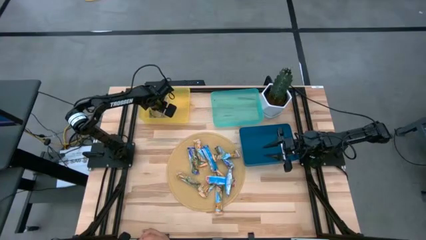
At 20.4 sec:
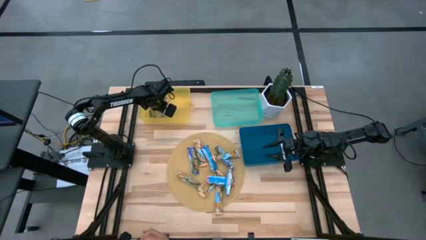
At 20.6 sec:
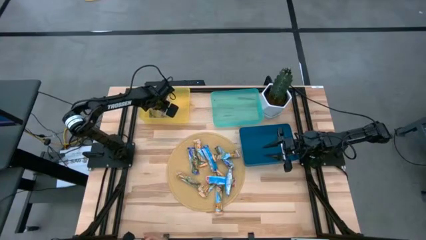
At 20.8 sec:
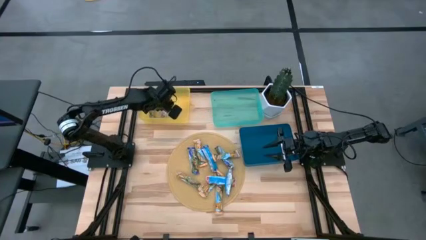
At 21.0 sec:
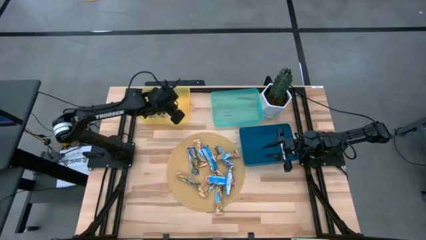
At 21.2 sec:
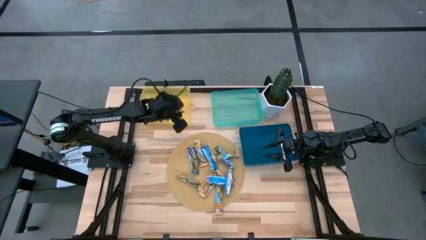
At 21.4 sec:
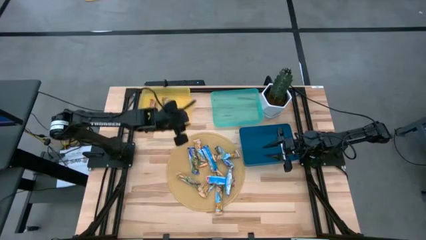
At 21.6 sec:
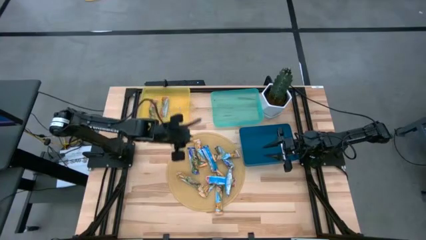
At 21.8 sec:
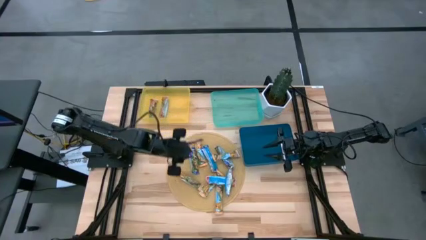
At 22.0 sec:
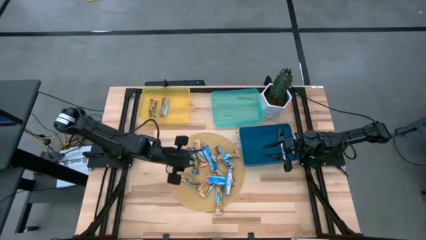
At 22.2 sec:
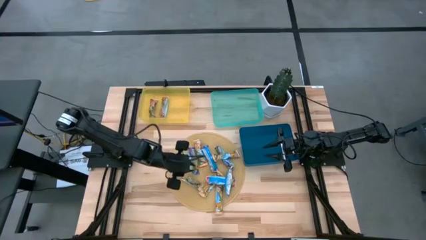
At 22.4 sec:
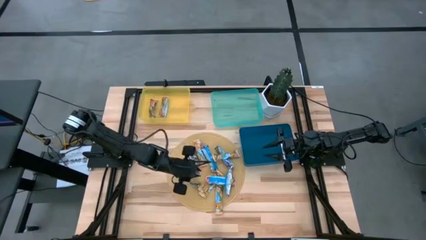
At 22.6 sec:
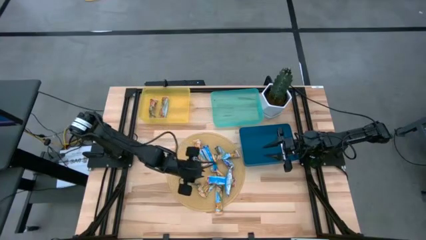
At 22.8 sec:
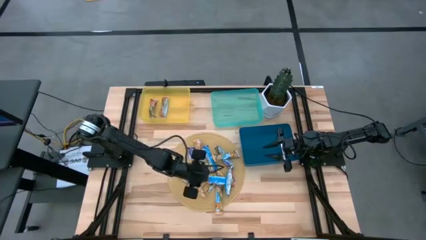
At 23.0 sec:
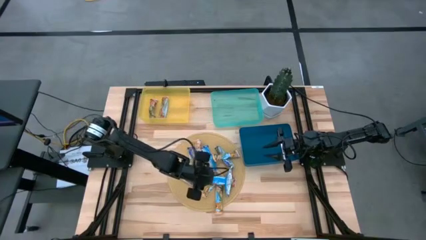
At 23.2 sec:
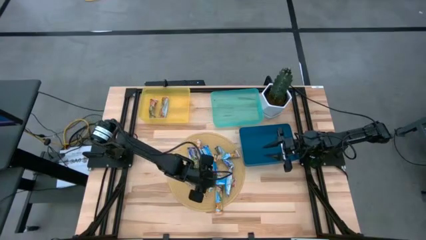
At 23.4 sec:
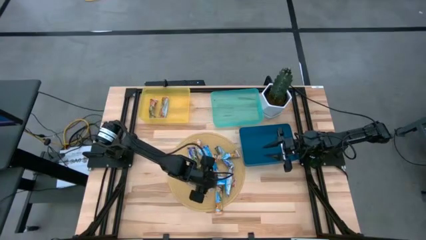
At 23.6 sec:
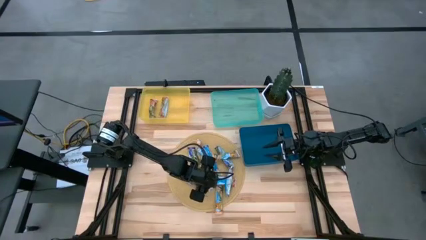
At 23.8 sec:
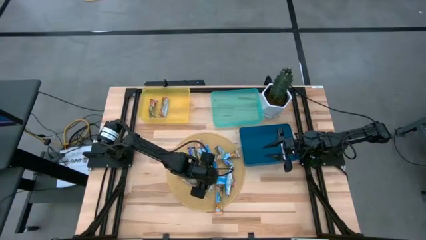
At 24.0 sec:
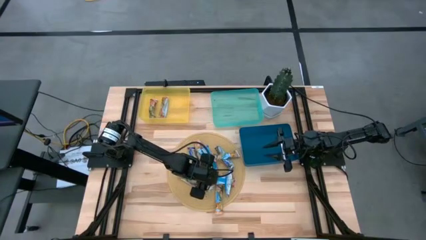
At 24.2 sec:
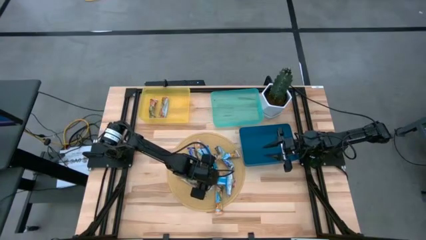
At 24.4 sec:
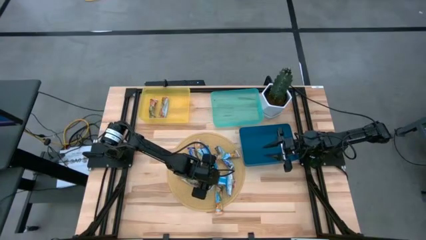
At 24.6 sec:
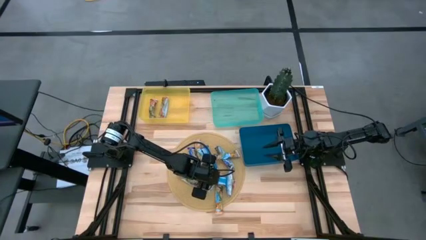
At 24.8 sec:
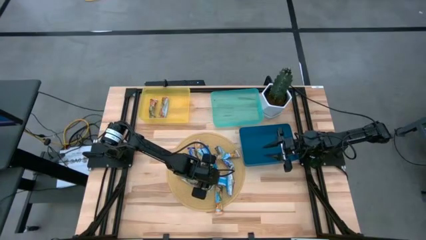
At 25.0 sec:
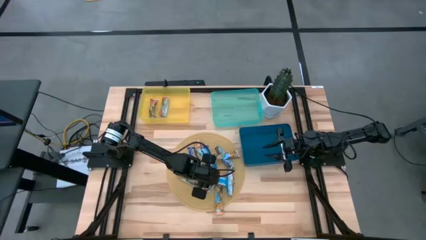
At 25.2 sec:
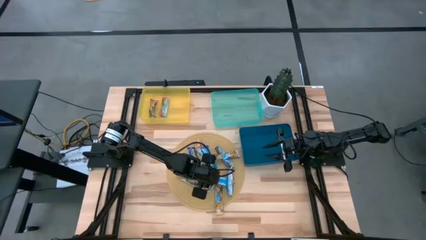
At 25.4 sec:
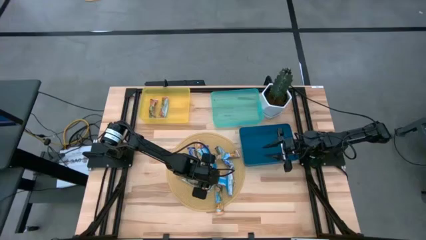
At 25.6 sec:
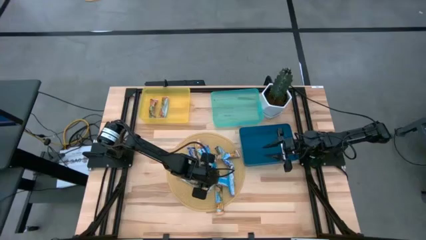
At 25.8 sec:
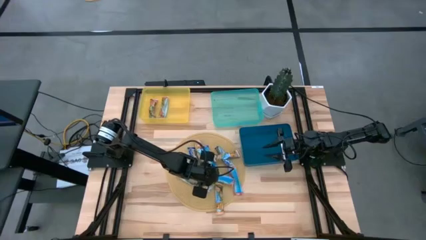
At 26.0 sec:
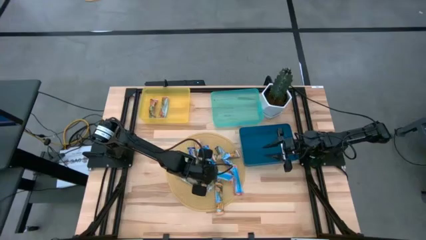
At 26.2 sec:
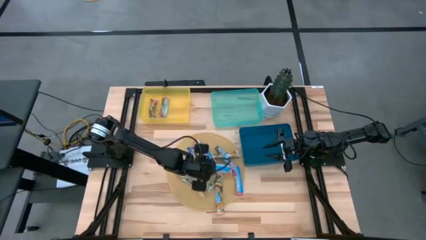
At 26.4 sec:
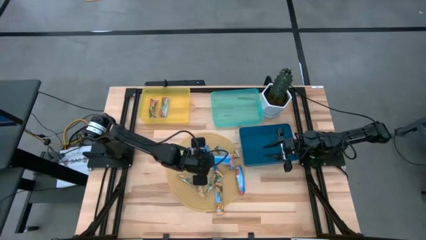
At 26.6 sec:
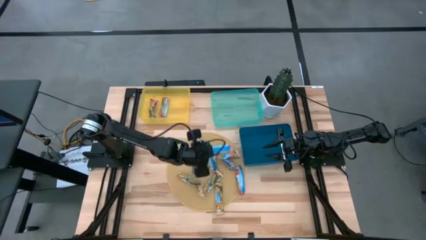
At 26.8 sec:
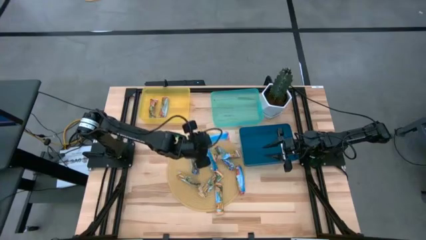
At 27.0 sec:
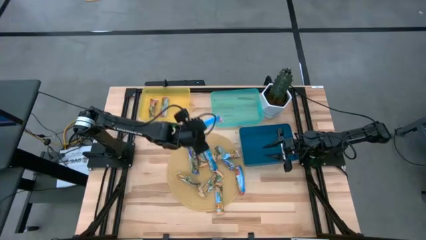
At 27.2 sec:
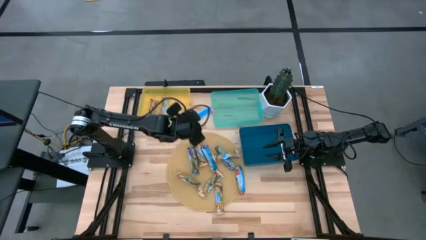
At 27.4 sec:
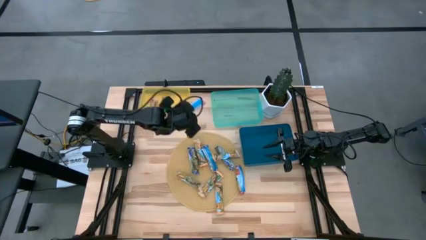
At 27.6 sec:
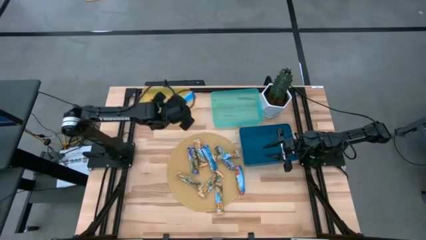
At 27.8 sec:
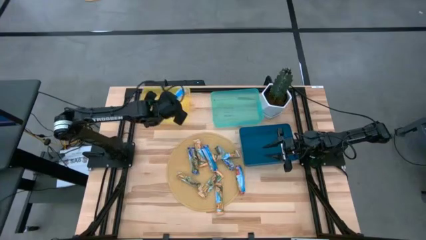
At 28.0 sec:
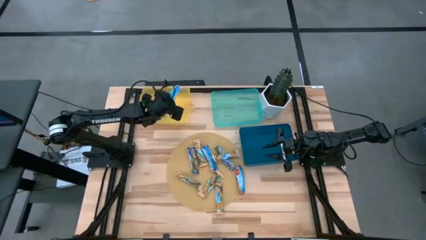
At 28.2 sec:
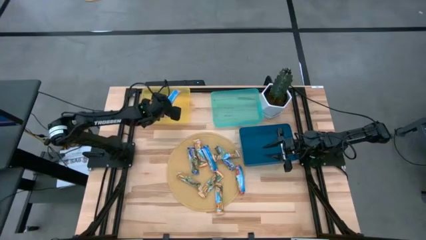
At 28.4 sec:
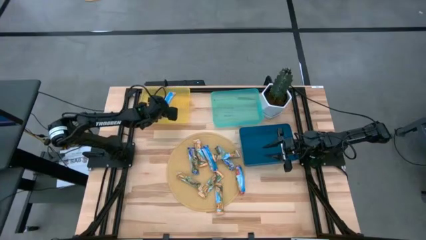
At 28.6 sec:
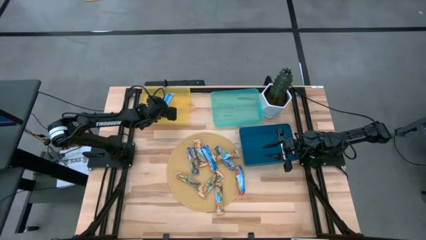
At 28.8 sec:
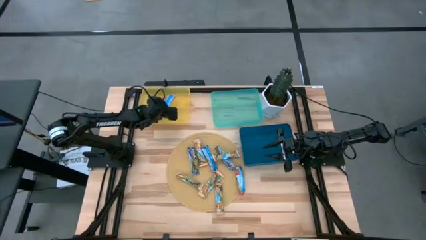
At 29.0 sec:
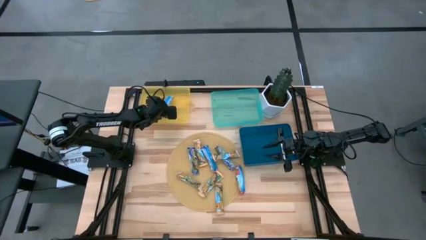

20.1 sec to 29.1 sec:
Task: Pick and place Granola Bars by type
Put the red granola bar into the yellow bin

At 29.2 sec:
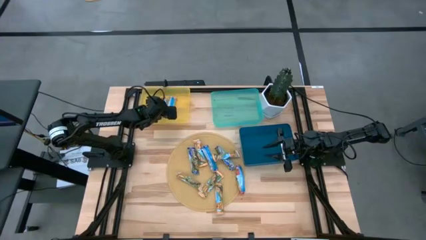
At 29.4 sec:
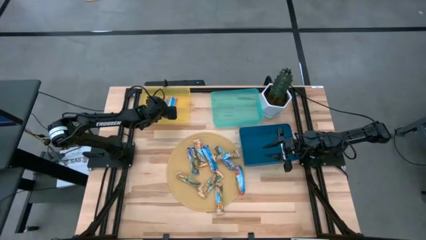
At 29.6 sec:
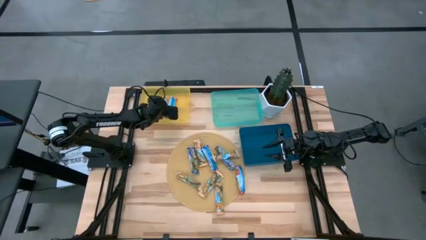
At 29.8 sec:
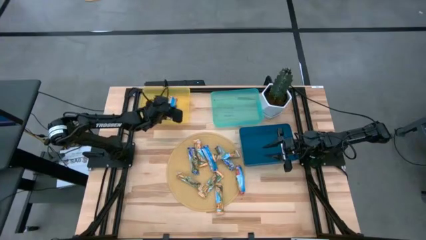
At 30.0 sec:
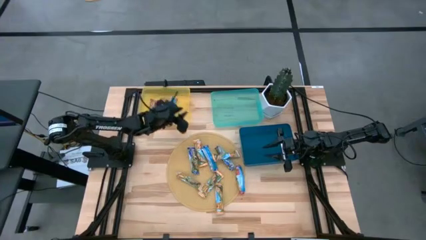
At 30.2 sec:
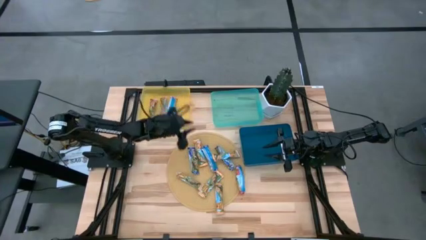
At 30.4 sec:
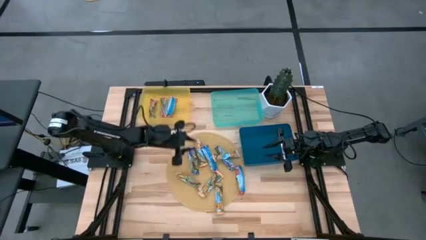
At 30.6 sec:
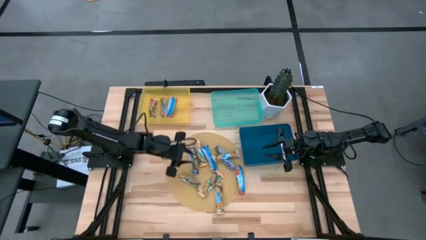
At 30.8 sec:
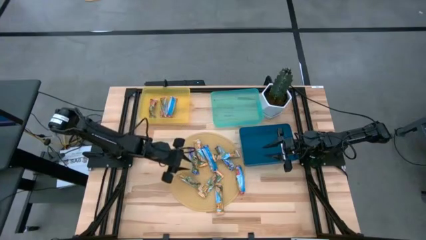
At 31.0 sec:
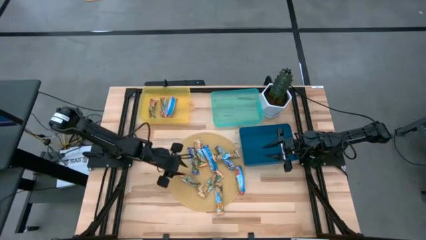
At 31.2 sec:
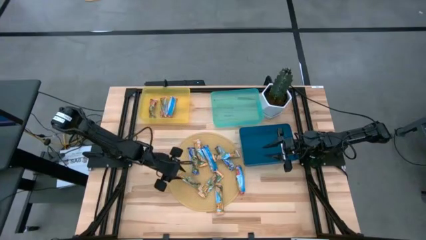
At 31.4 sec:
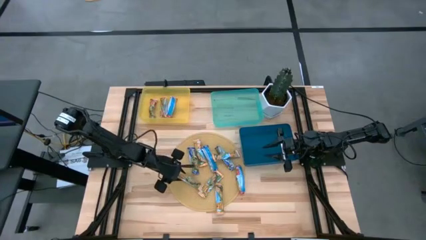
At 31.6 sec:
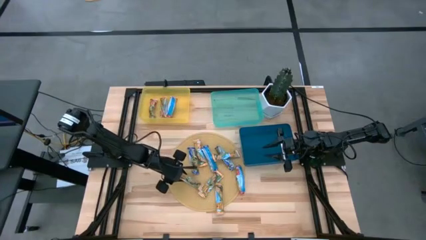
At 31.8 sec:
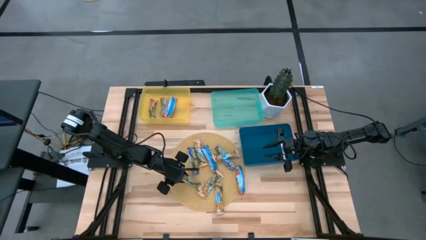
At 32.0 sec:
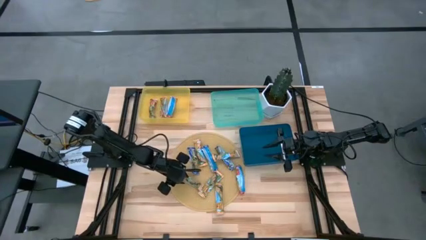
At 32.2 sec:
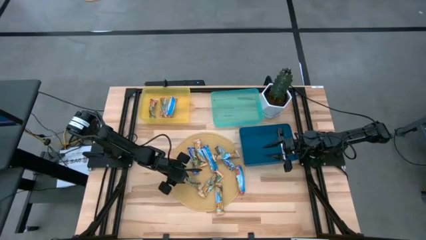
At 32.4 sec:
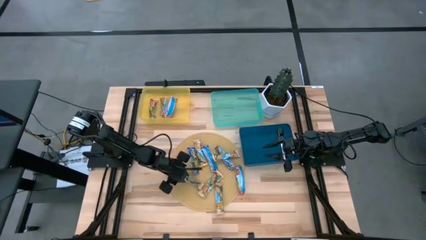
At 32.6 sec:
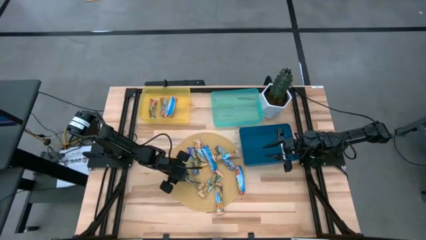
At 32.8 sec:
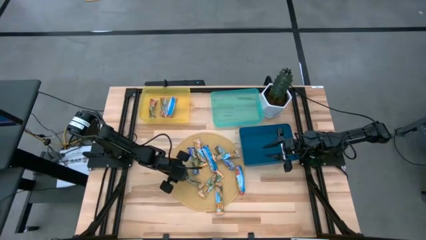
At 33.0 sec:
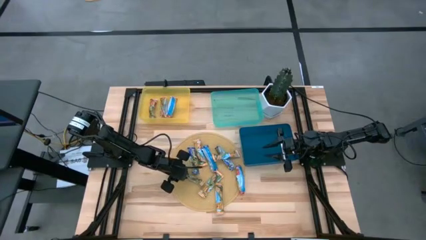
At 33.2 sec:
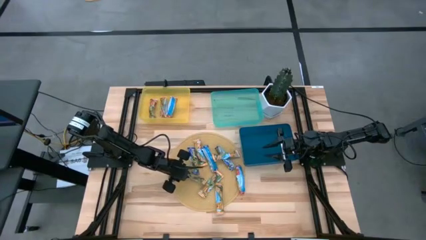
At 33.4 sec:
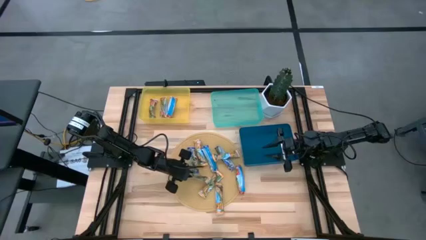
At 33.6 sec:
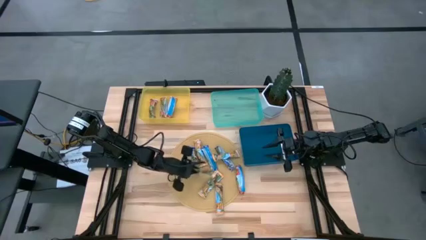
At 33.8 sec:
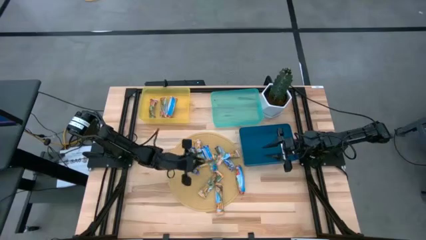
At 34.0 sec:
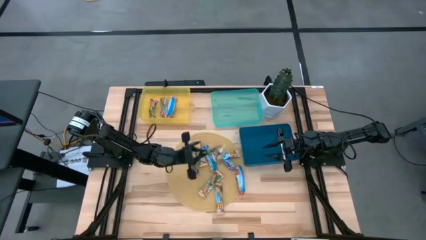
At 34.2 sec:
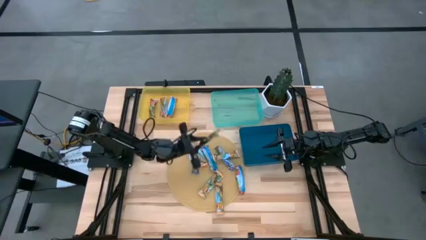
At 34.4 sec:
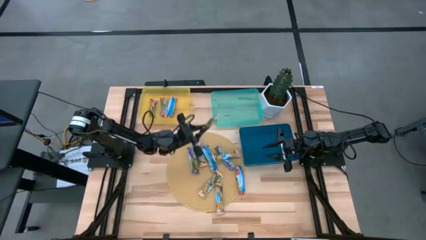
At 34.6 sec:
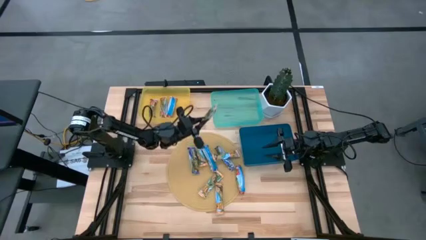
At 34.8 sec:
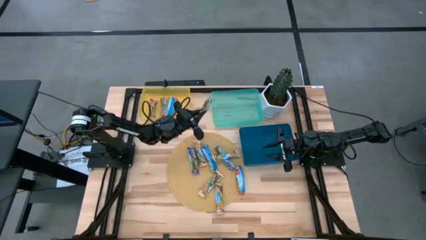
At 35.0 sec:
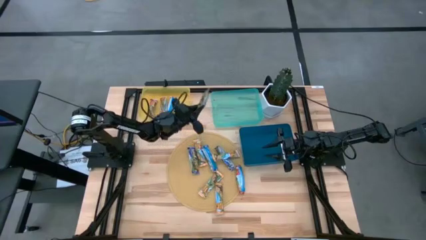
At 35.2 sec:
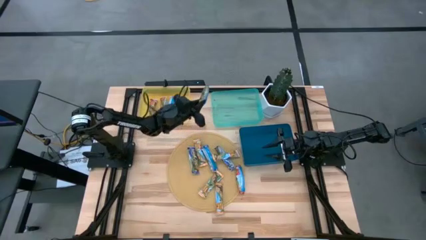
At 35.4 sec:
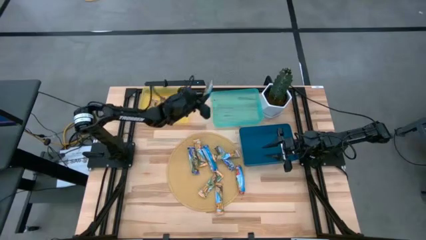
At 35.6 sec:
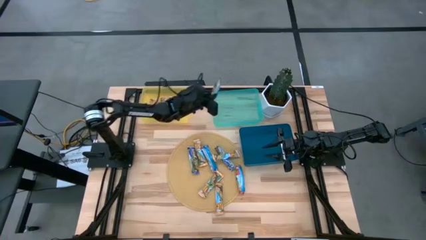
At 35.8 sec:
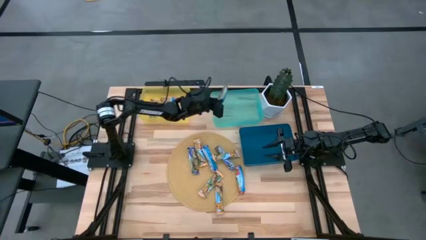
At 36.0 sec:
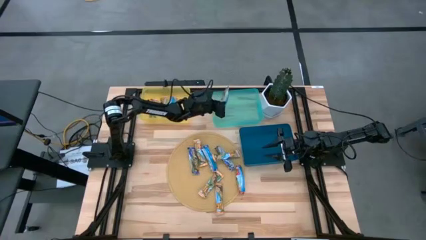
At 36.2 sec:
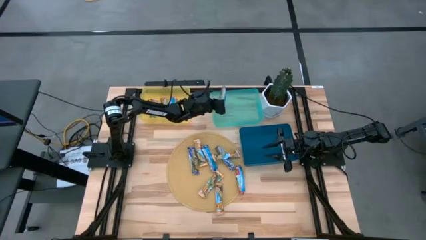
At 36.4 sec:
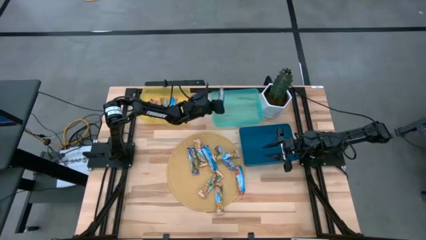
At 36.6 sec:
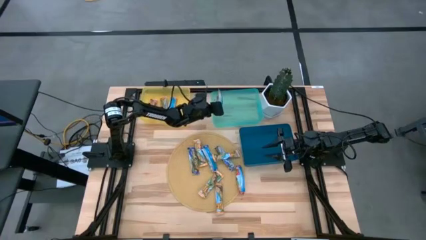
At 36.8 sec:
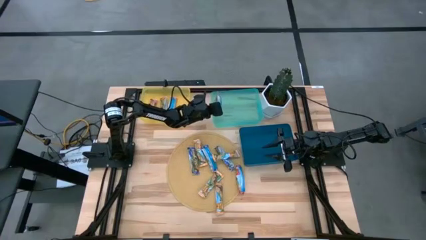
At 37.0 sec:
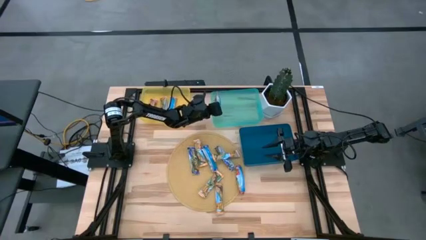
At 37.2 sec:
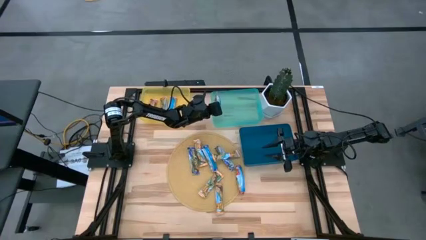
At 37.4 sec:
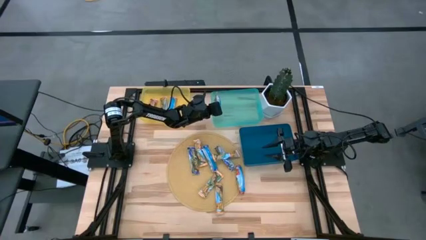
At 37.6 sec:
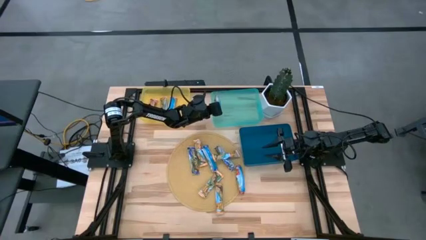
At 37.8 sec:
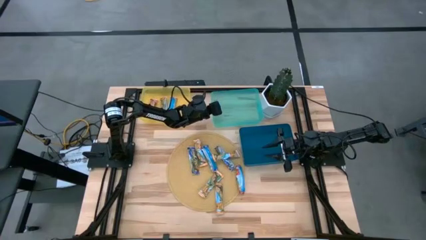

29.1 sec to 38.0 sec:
Put the orange granola bar into the green bin
